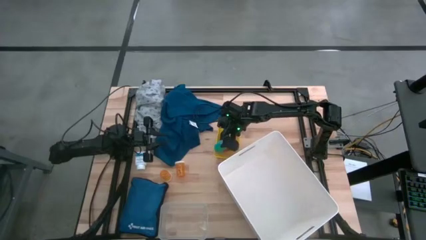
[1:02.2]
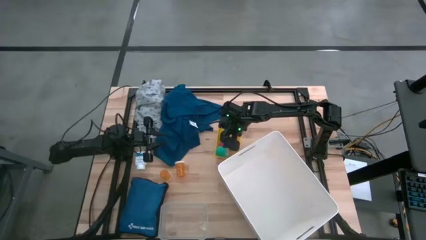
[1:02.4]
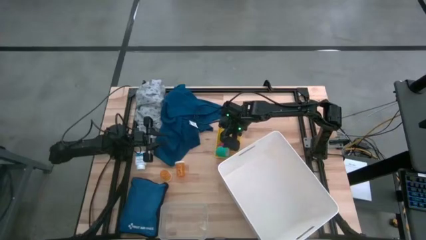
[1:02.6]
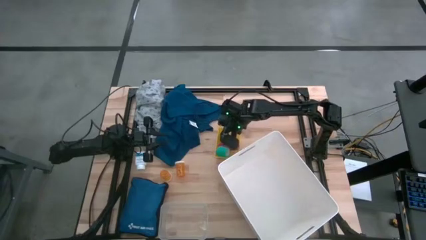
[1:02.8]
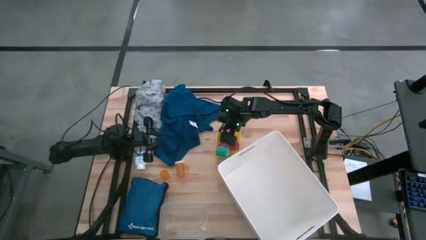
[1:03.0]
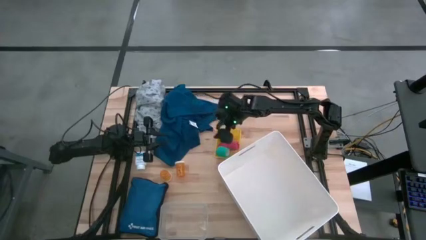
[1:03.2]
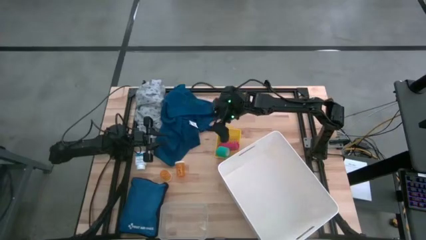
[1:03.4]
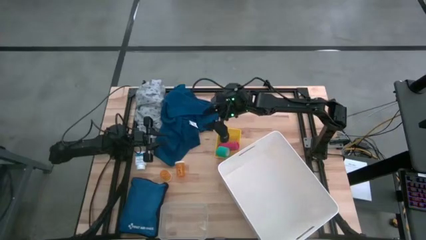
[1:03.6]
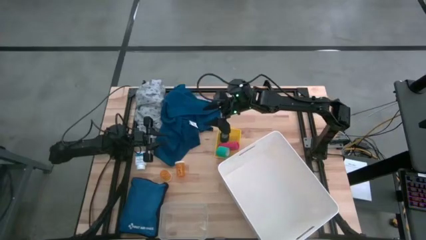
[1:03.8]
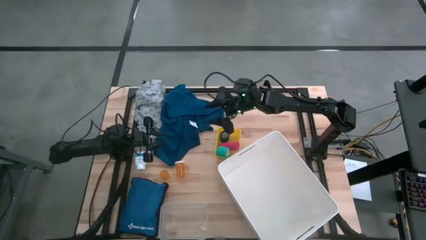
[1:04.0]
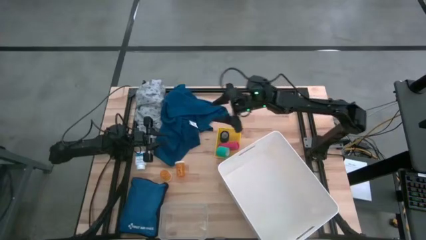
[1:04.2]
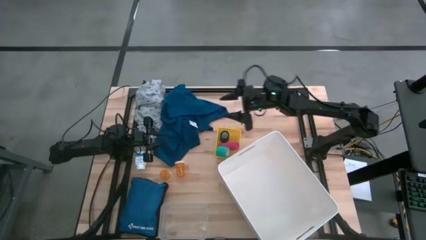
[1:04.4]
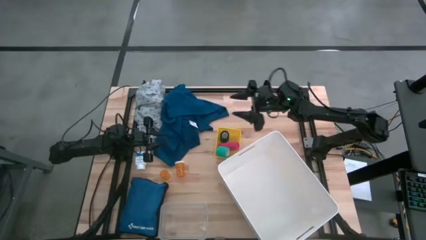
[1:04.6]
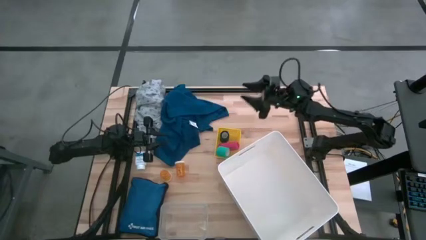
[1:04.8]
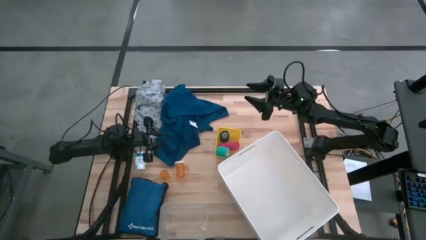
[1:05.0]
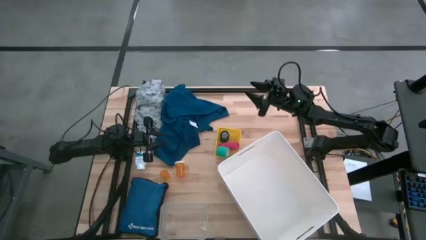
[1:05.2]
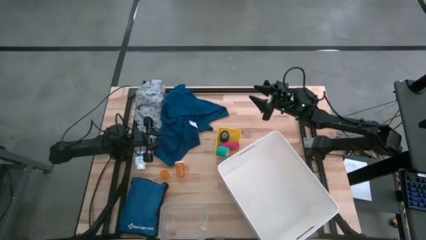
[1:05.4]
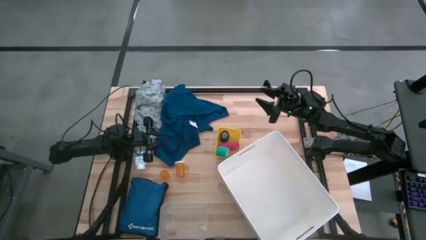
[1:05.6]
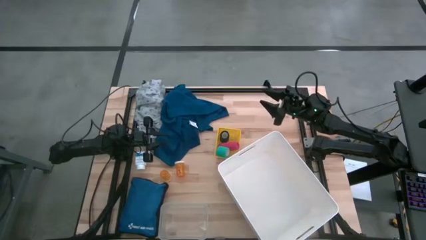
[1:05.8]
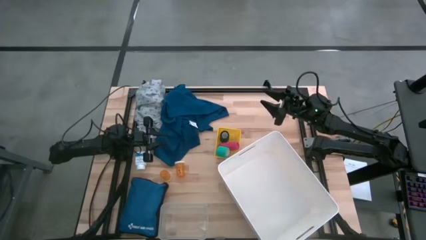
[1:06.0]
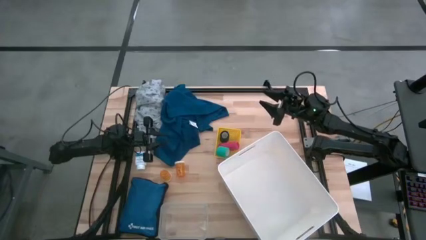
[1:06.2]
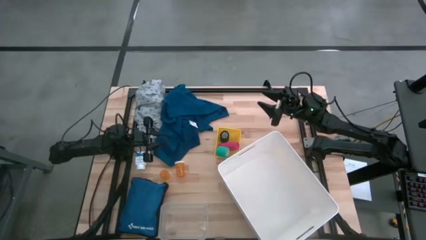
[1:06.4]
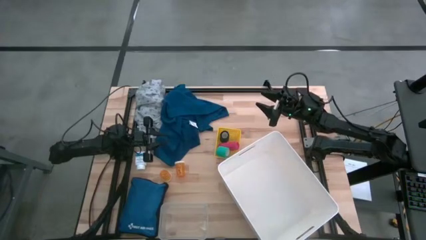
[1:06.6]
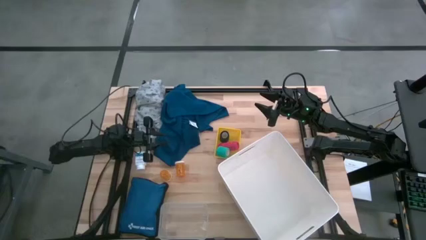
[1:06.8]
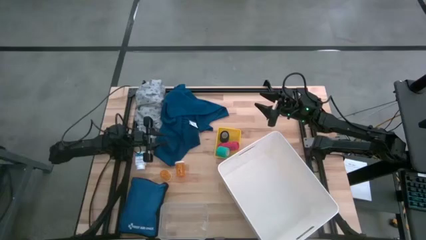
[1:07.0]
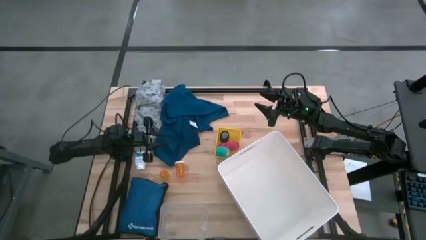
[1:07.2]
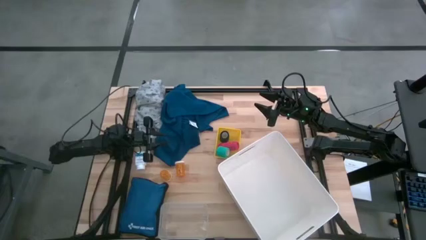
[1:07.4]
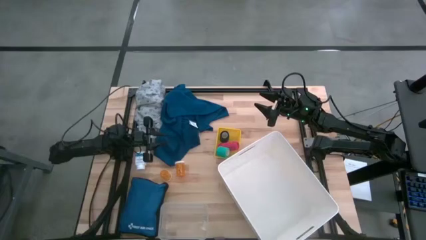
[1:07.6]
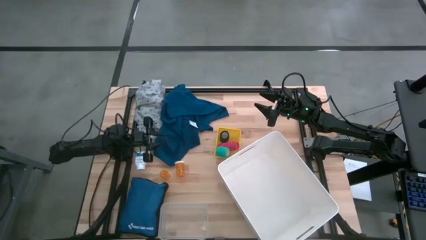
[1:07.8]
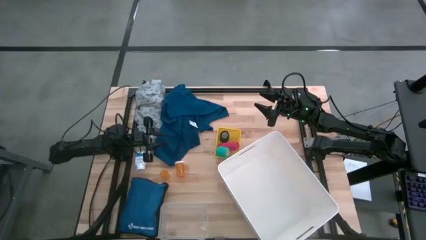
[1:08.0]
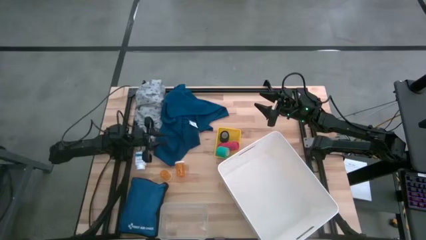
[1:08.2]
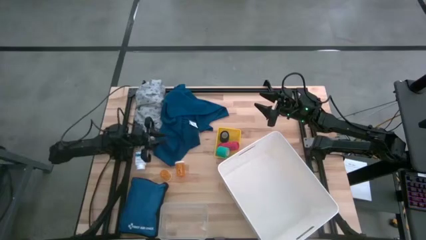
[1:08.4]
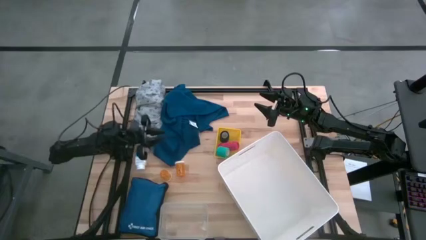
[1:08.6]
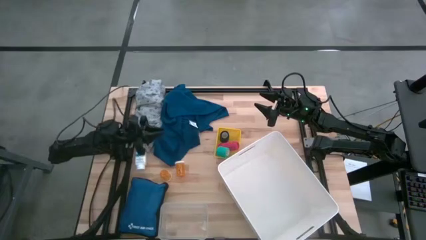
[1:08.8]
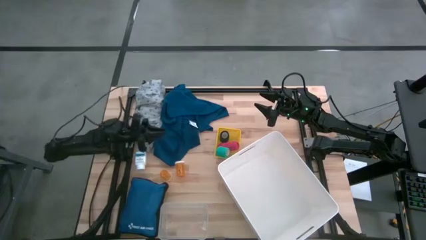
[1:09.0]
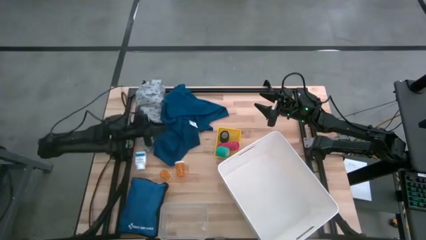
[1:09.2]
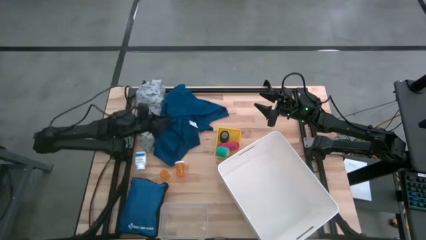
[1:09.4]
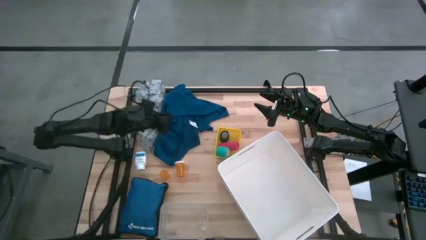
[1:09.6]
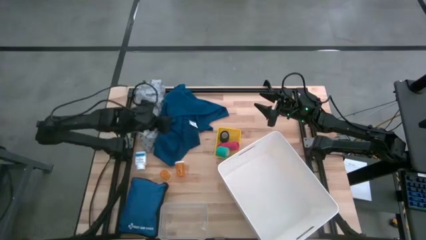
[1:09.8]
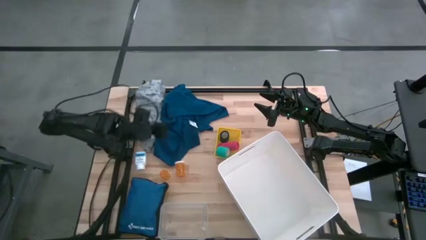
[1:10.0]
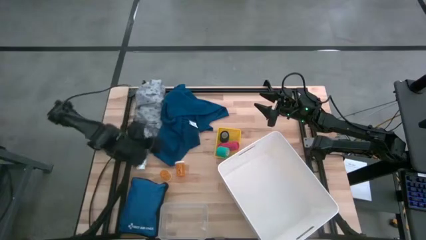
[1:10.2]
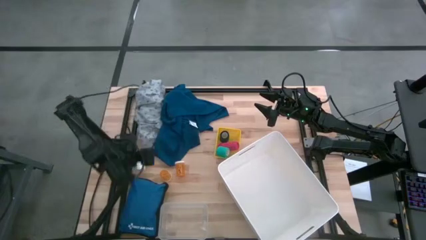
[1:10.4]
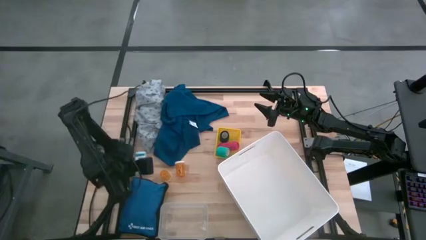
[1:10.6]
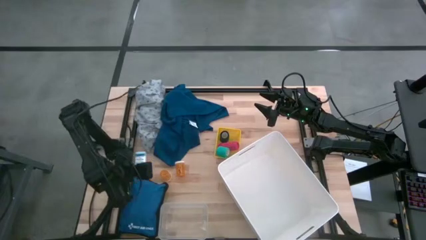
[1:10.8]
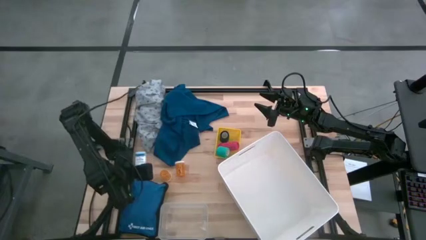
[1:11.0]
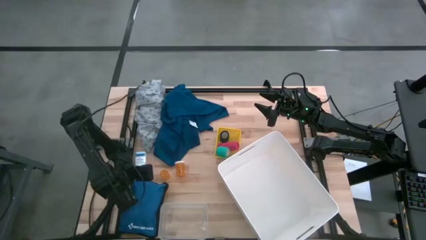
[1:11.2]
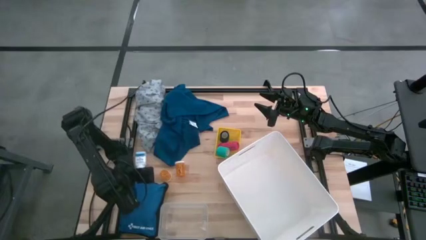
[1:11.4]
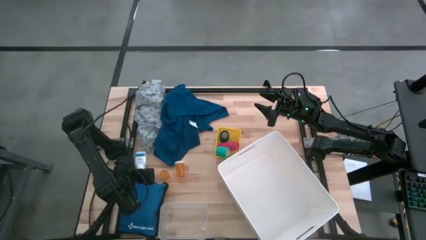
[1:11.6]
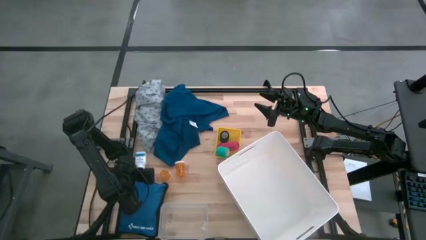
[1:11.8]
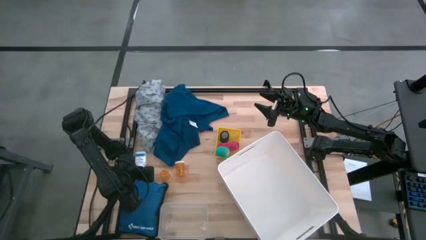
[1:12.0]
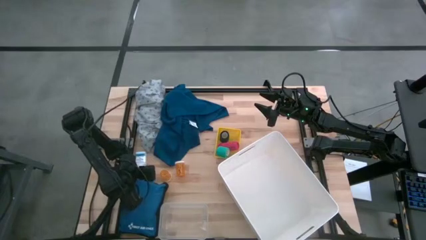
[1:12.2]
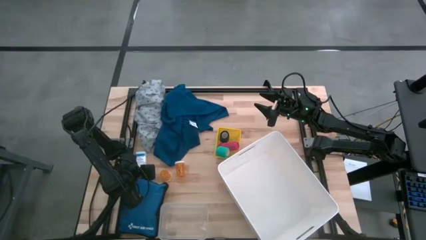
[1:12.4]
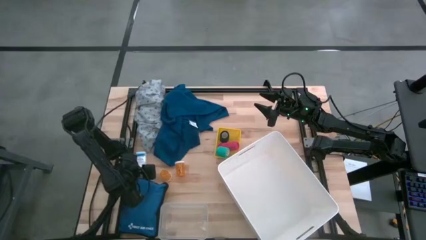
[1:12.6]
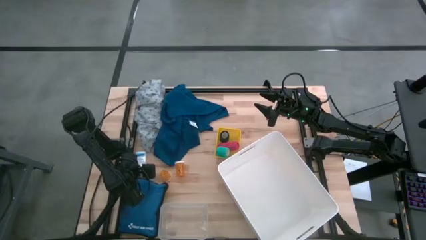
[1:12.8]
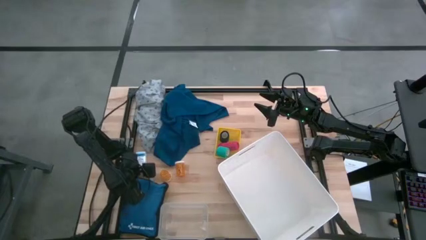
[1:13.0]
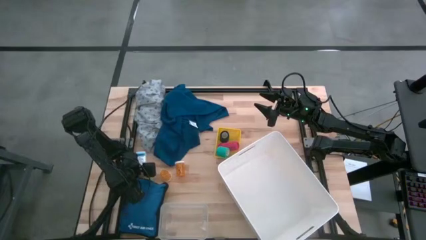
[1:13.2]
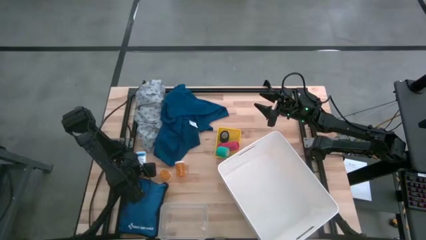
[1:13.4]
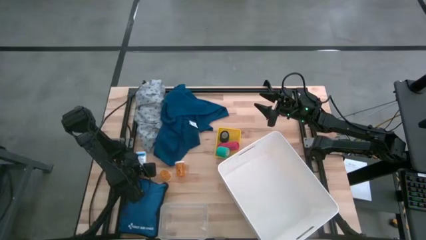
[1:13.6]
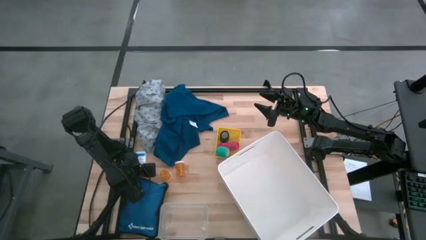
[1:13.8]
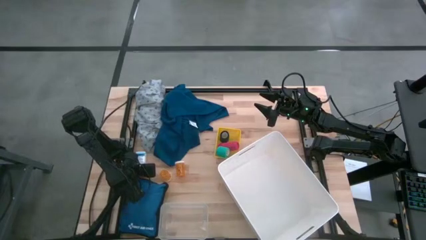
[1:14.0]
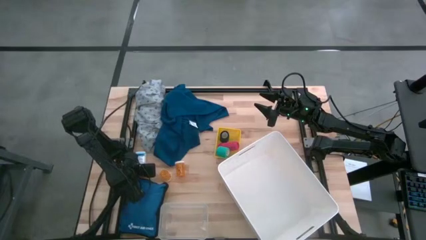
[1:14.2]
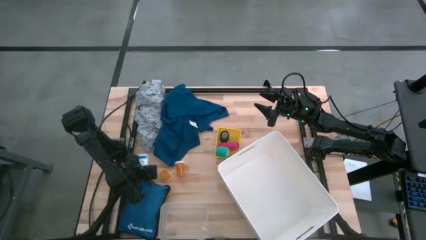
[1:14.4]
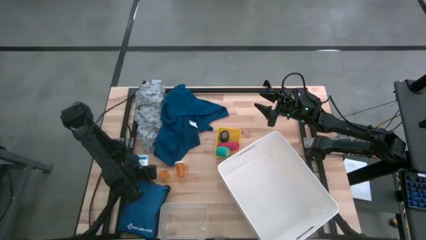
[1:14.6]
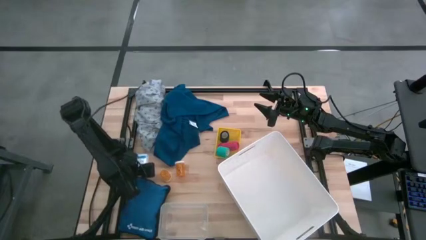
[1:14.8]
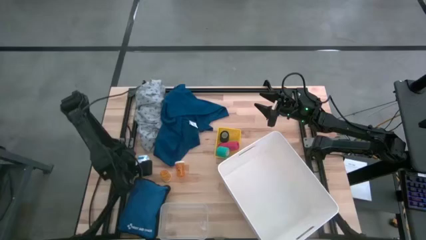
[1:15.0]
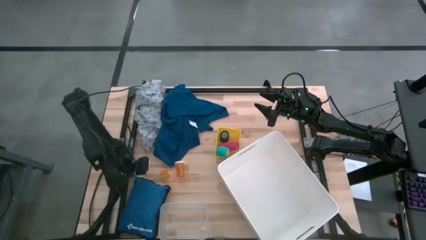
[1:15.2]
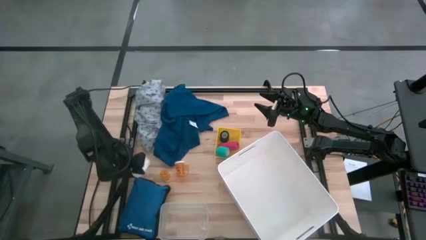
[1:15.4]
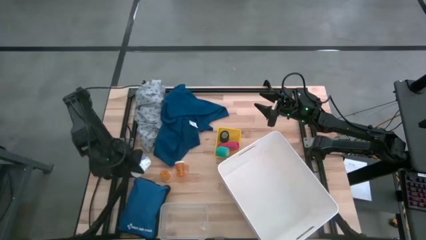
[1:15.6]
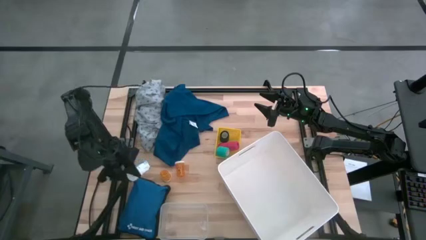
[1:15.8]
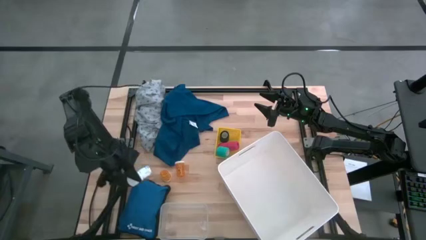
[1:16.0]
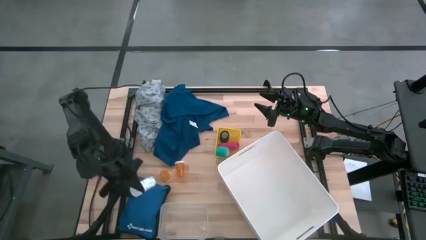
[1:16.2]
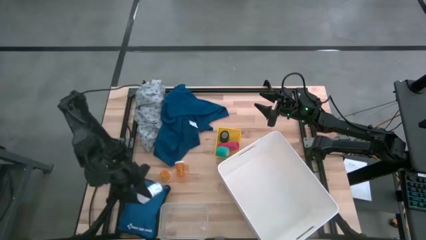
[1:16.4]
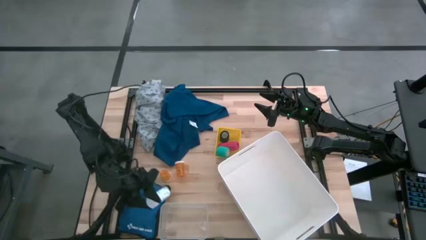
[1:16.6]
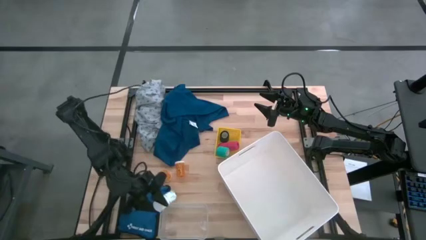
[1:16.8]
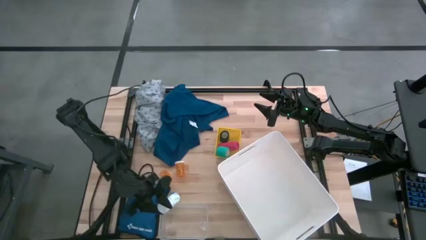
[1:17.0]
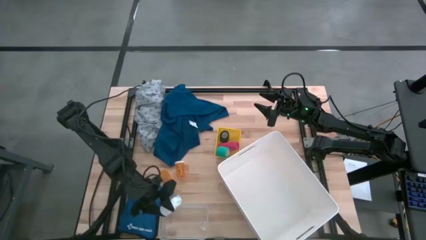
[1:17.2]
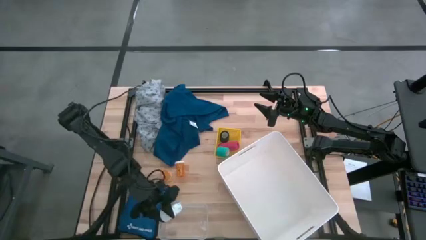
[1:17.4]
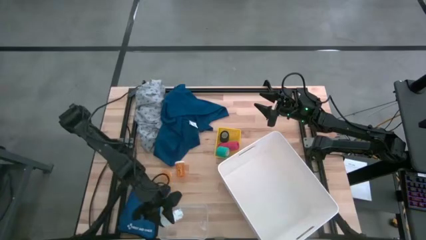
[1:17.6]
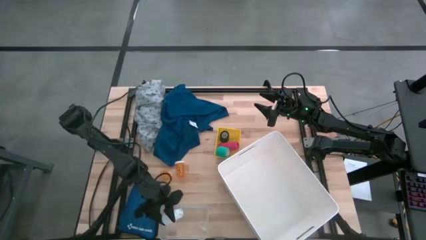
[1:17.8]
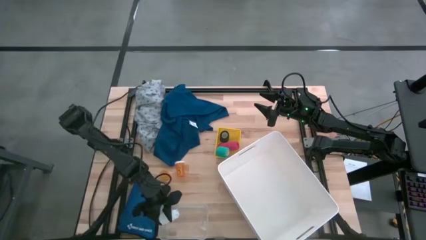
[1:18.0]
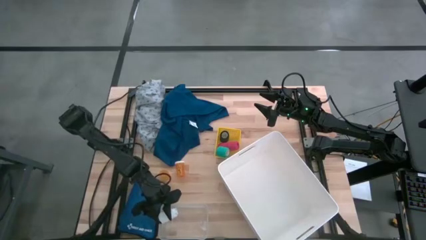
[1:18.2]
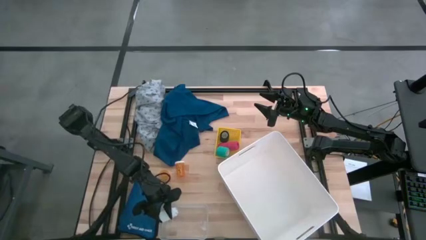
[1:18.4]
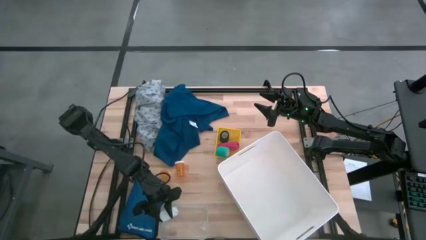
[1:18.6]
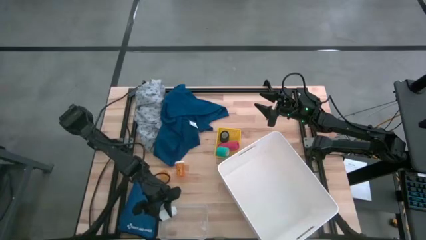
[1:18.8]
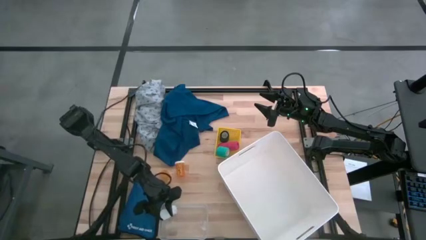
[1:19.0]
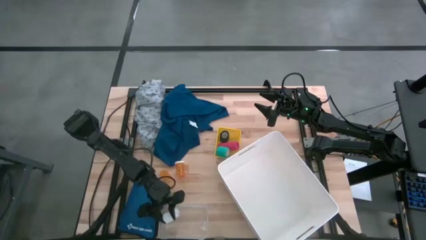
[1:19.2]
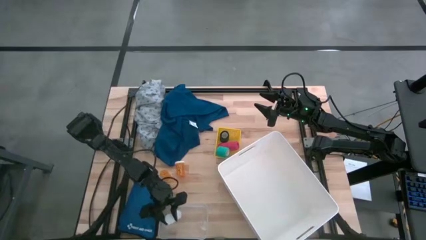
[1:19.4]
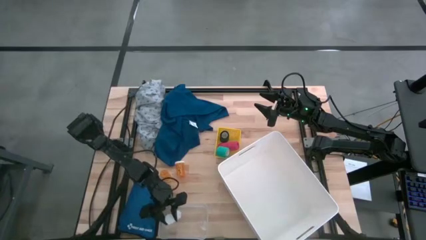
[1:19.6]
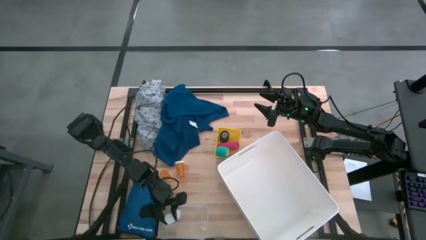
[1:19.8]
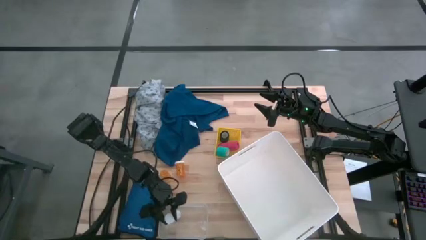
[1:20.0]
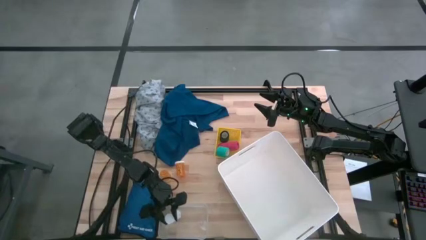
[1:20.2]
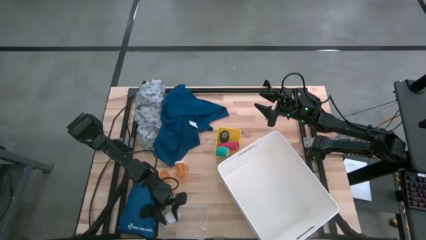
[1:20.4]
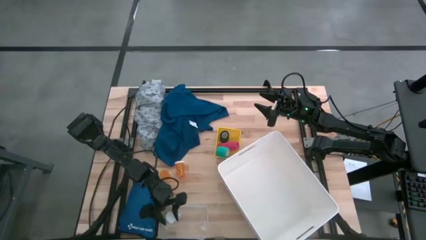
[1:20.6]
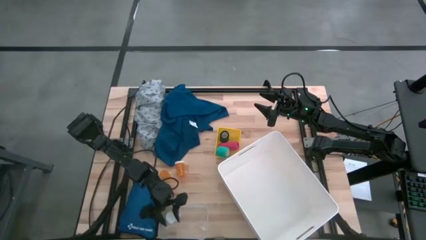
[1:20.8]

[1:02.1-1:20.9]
Task: Pick & place medical supplies in basket/bin
Put the white pill bottle into the transparent bin
